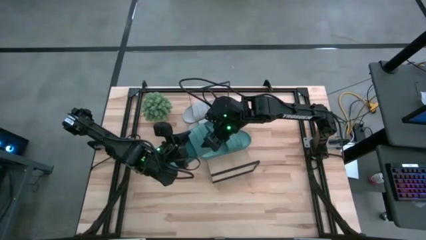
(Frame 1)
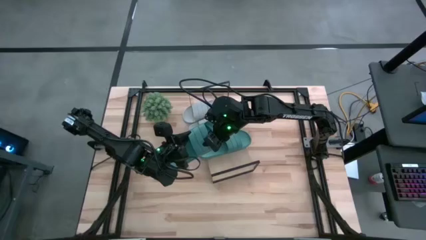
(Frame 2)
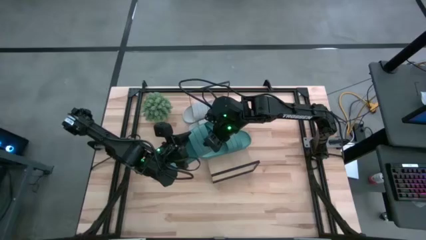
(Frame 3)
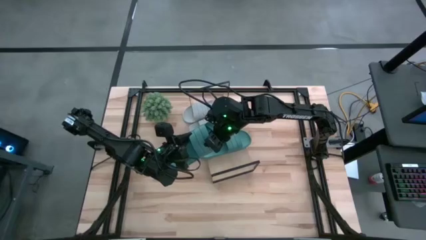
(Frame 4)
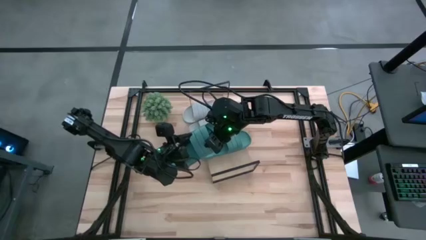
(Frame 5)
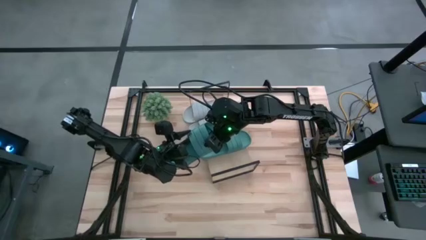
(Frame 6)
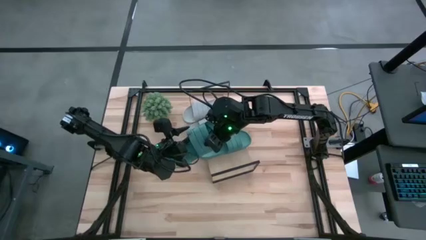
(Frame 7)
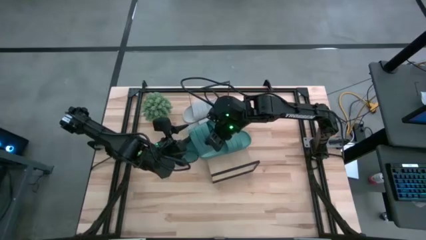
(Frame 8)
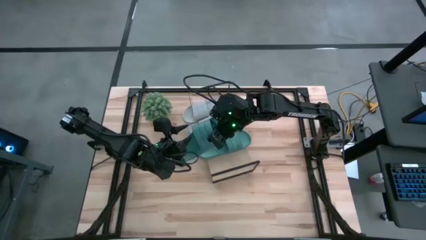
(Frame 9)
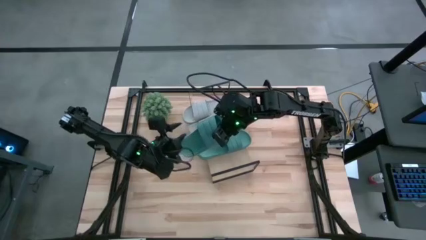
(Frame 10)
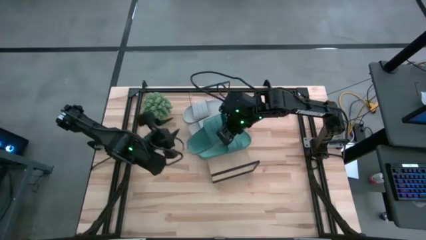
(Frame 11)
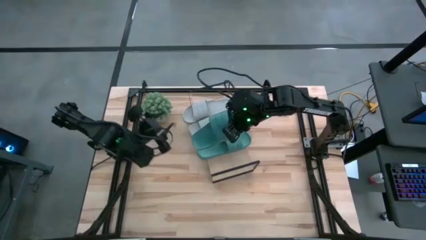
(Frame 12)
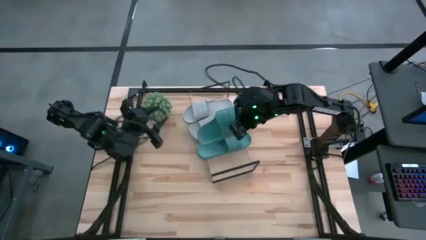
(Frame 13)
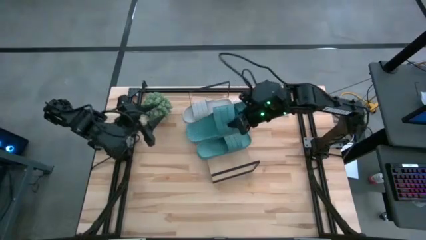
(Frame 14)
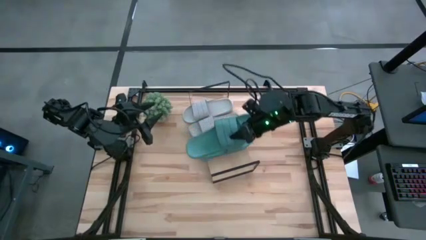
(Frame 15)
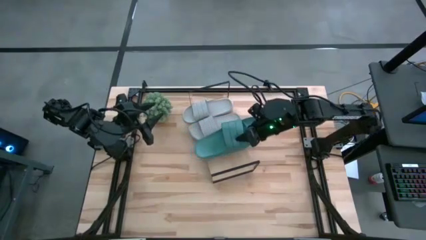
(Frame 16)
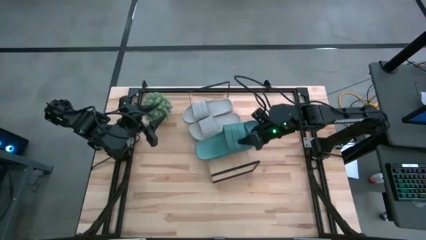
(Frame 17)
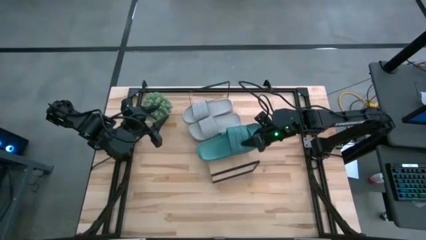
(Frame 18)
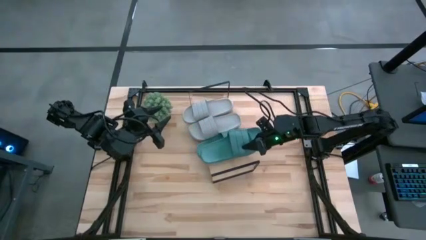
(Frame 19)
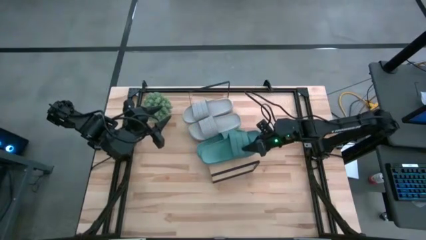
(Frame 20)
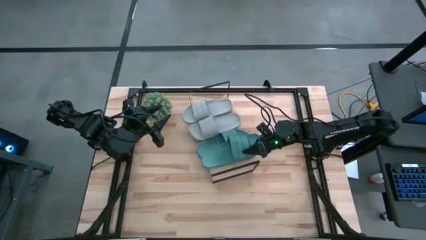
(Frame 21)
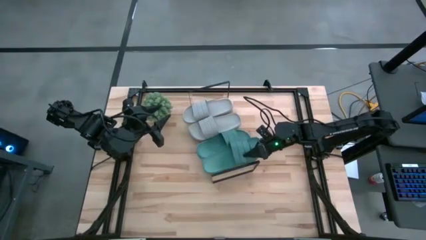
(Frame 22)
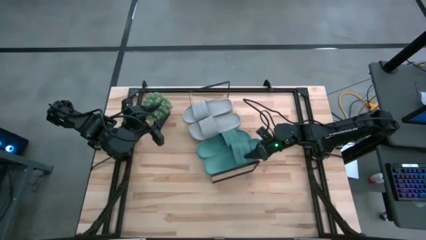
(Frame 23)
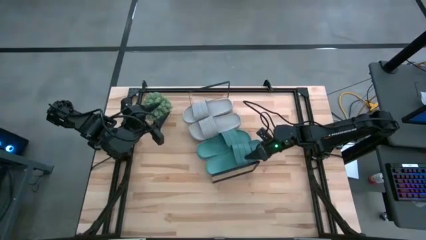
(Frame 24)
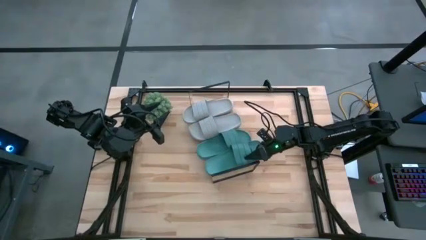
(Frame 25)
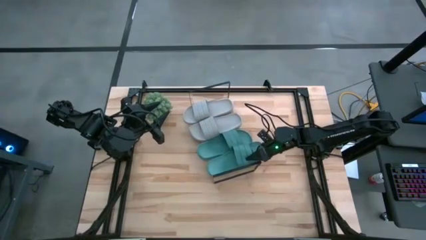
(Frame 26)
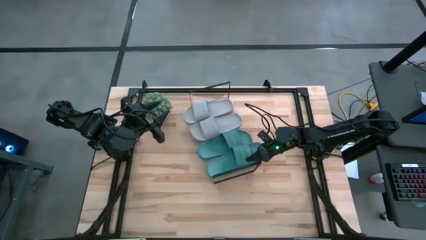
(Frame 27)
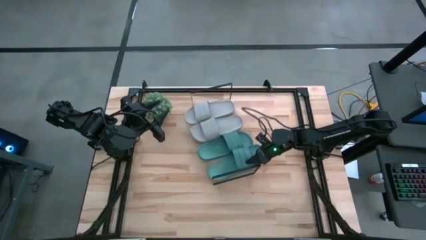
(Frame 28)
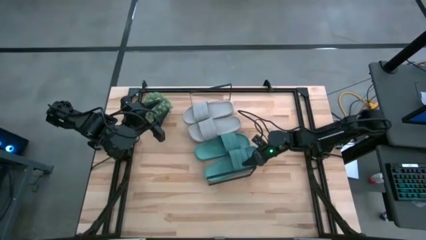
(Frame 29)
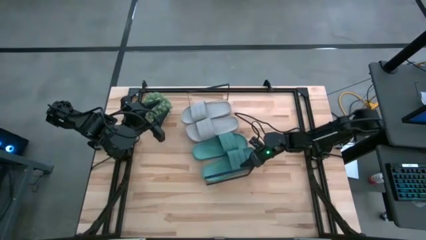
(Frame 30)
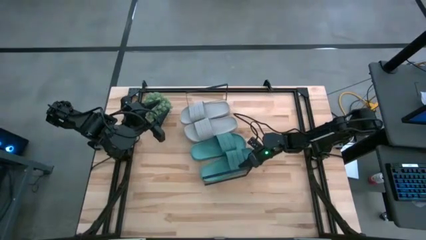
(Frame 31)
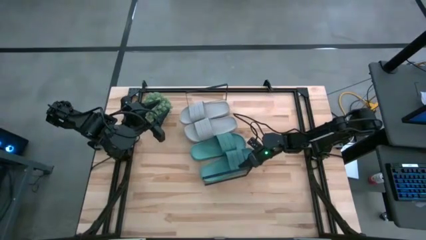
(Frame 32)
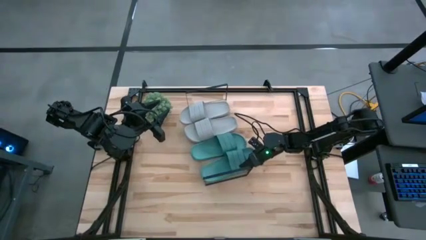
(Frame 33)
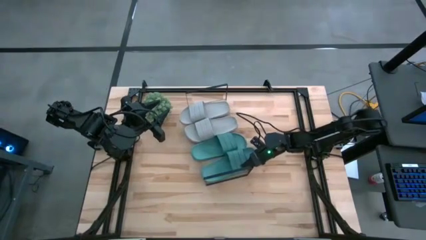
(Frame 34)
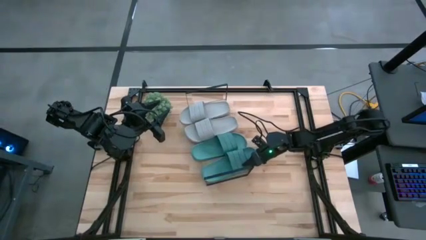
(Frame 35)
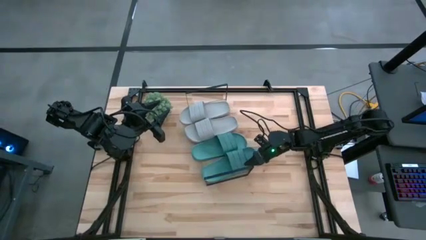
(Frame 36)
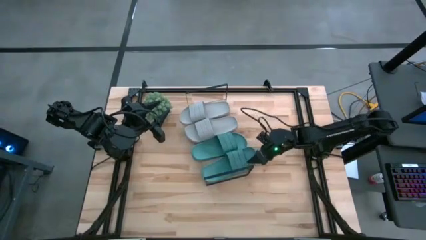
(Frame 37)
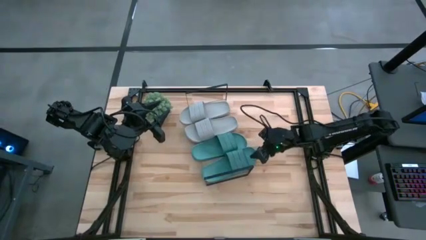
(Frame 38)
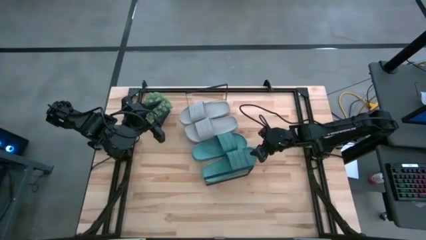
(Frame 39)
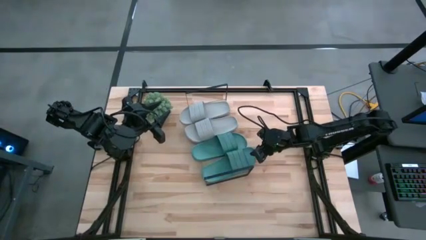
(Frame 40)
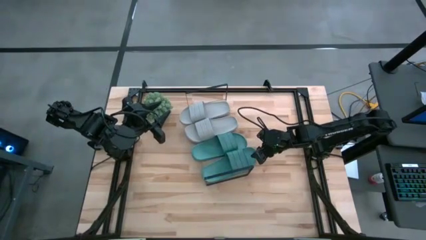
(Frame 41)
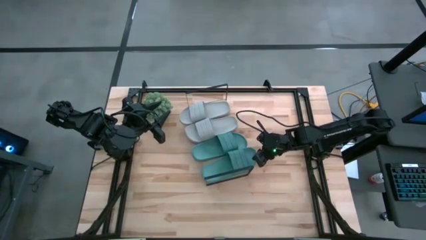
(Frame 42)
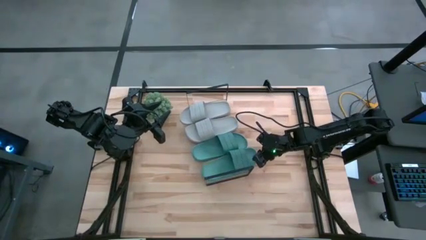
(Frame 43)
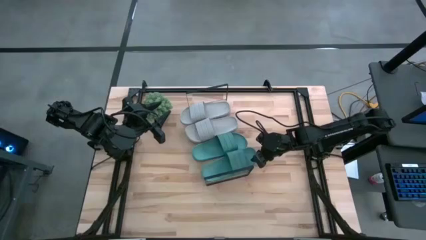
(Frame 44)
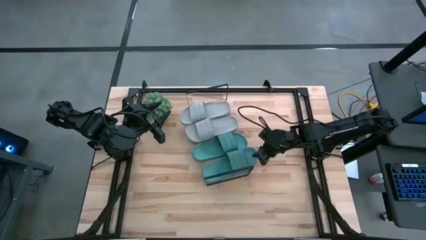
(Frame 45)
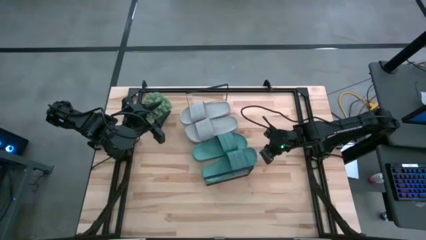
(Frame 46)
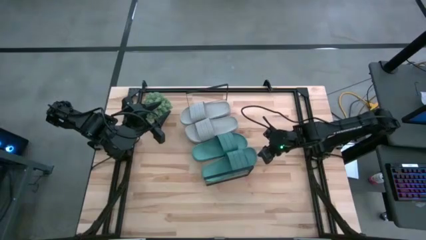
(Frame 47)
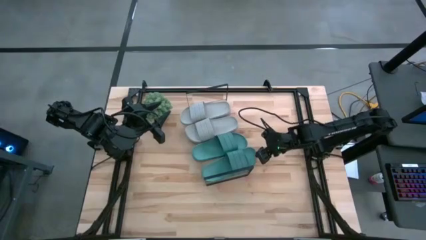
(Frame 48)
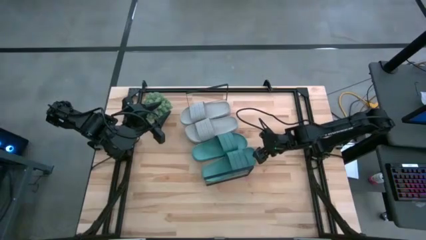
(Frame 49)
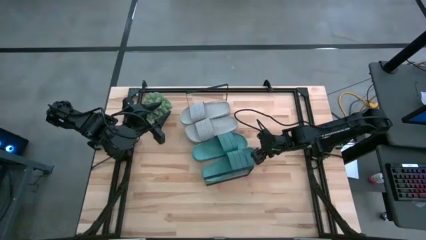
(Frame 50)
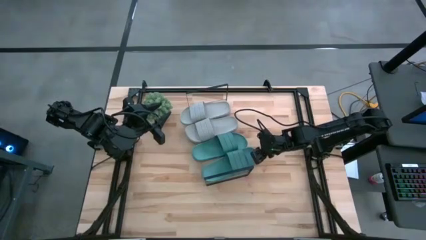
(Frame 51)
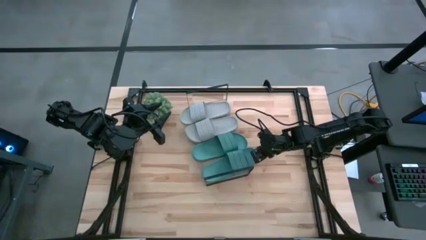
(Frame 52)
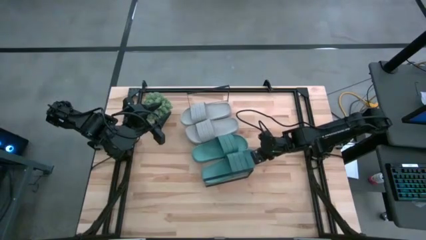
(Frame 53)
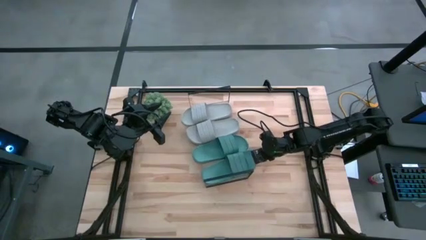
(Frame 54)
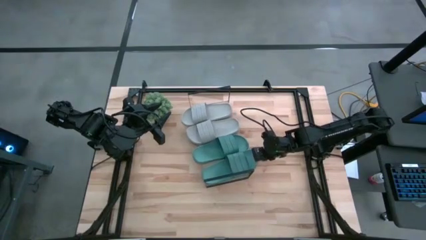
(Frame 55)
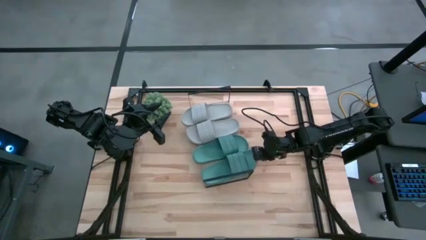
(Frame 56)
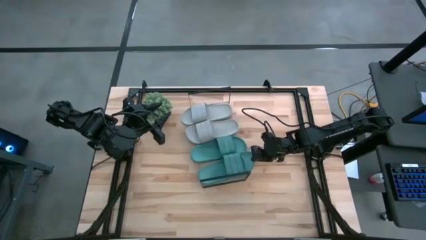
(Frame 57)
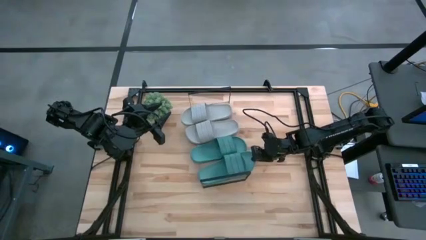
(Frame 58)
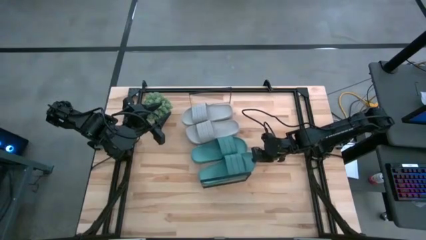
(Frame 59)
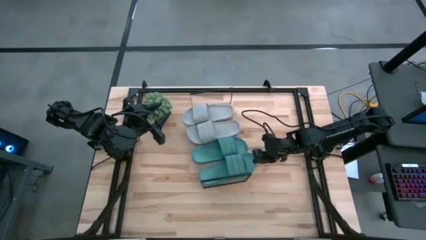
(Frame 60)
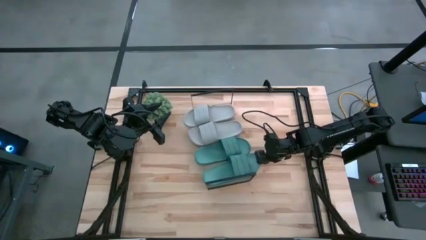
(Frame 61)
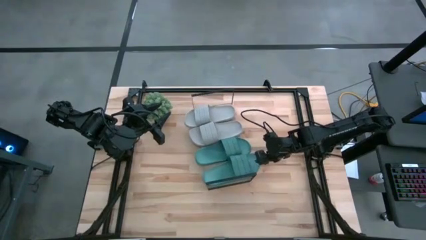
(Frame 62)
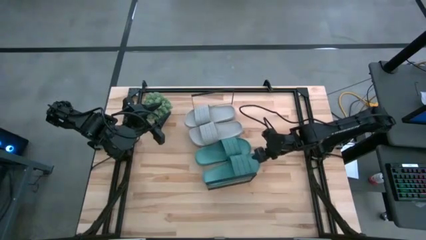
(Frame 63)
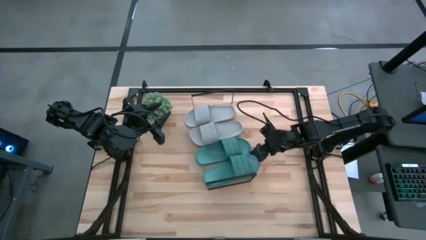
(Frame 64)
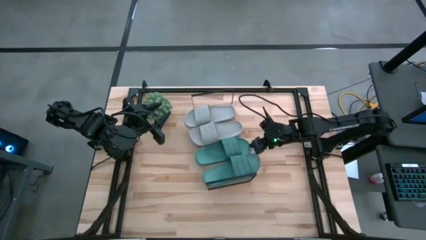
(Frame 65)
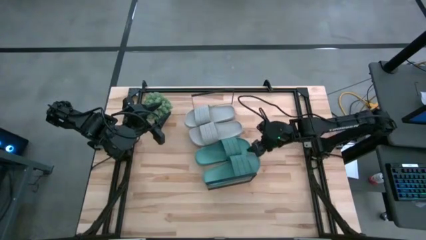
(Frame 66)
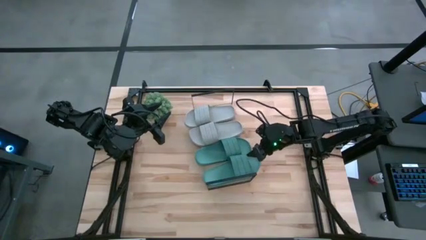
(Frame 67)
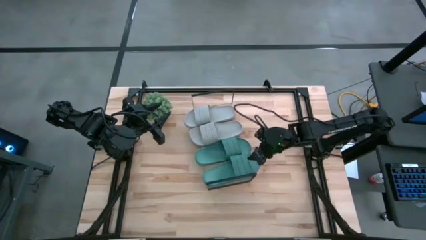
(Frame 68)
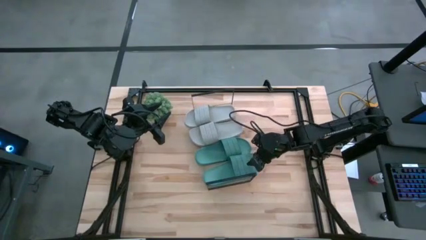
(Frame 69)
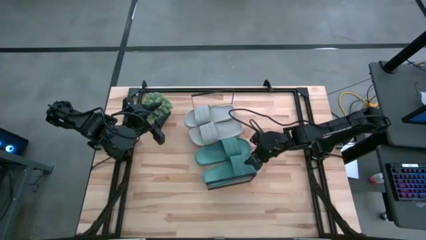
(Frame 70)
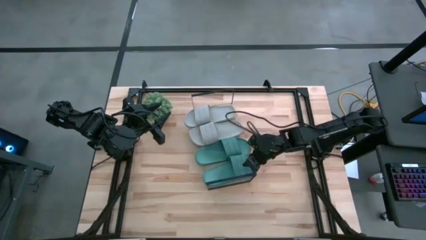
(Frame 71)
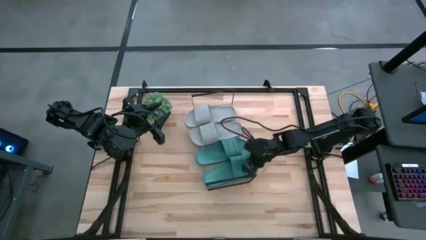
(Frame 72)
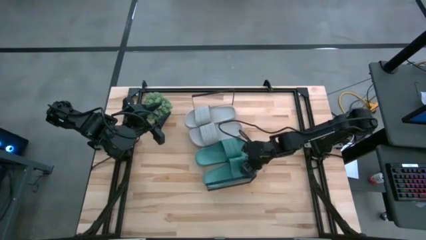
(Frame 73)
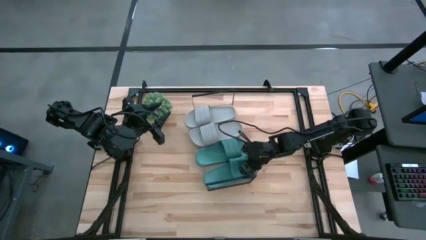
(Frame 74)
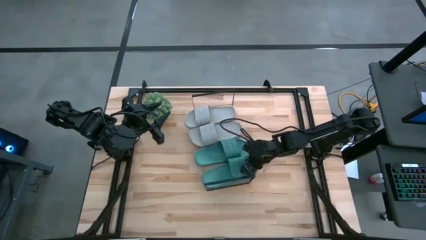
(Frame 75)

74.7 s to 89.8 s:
Task: Pick and place slides into the shelf
Put the green slipper on the shelf
